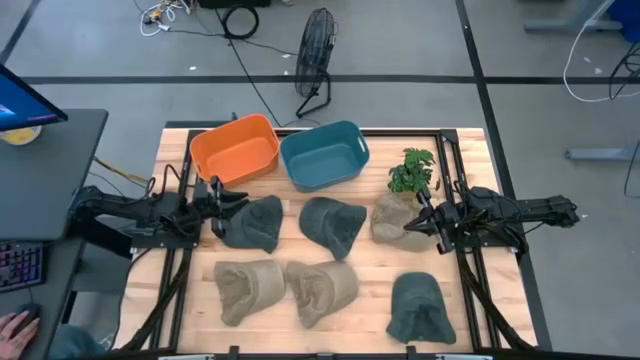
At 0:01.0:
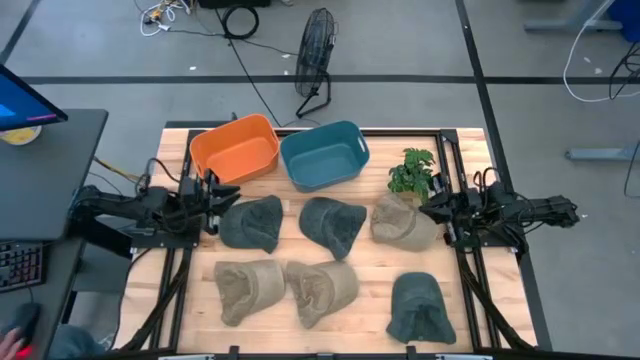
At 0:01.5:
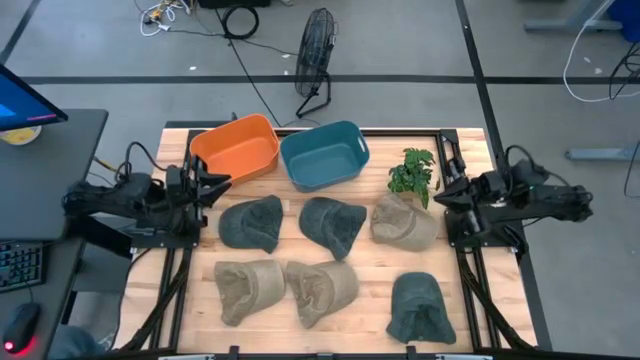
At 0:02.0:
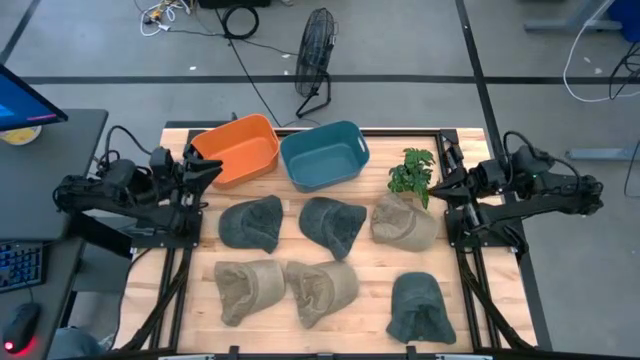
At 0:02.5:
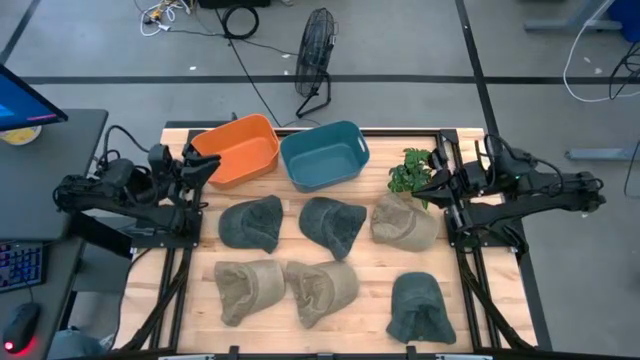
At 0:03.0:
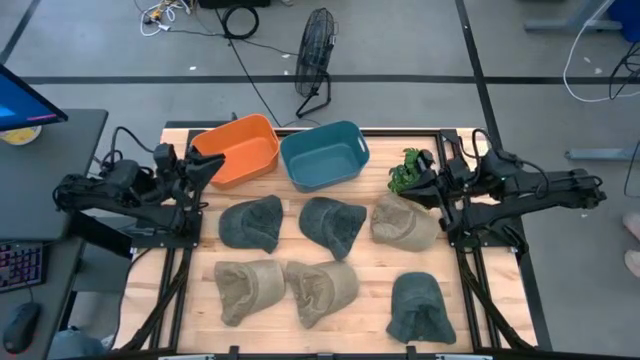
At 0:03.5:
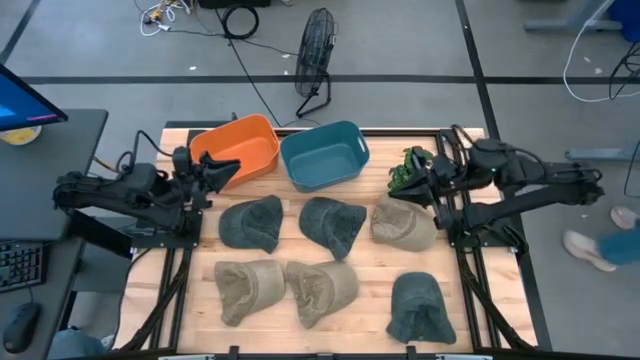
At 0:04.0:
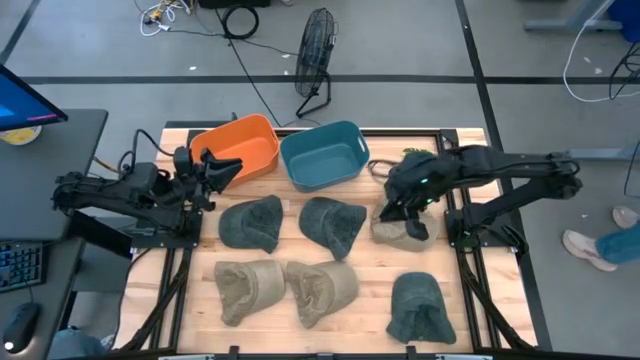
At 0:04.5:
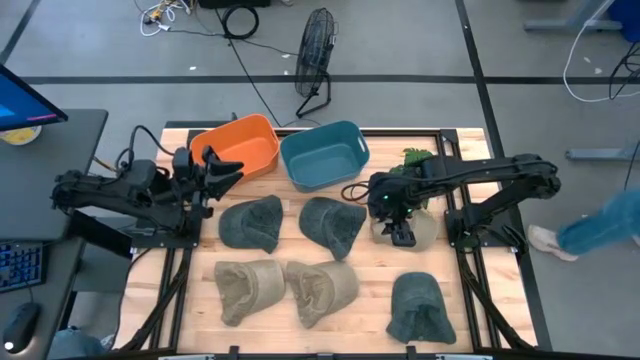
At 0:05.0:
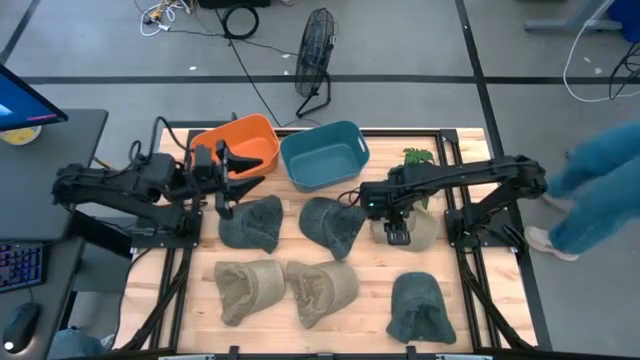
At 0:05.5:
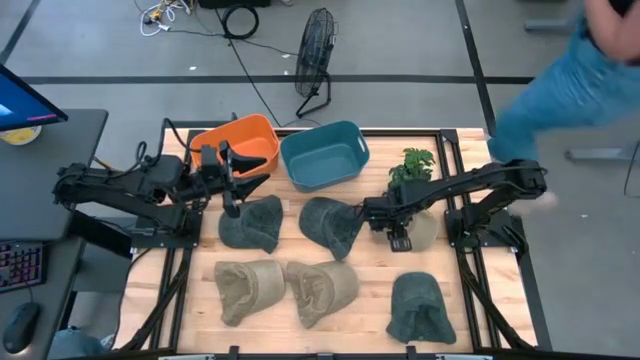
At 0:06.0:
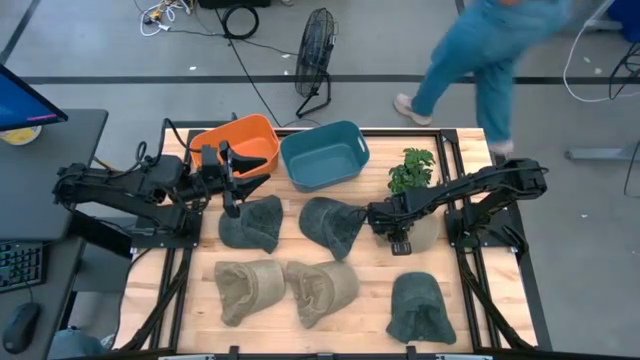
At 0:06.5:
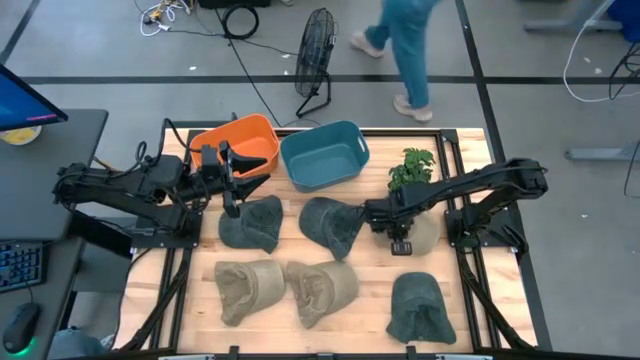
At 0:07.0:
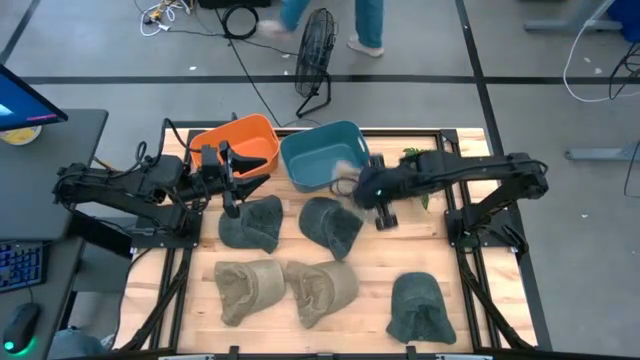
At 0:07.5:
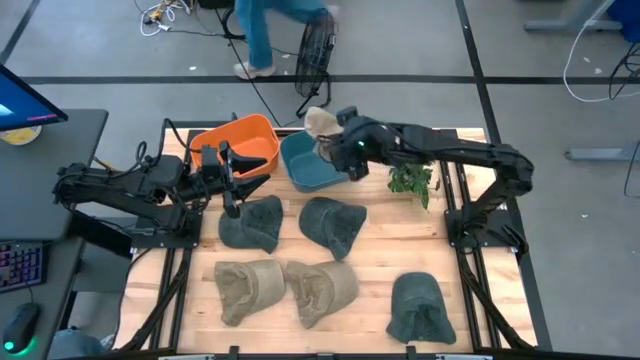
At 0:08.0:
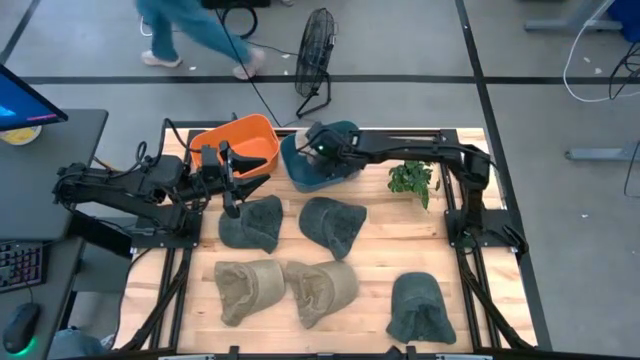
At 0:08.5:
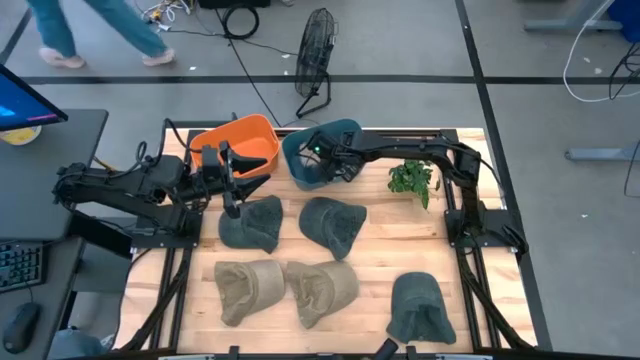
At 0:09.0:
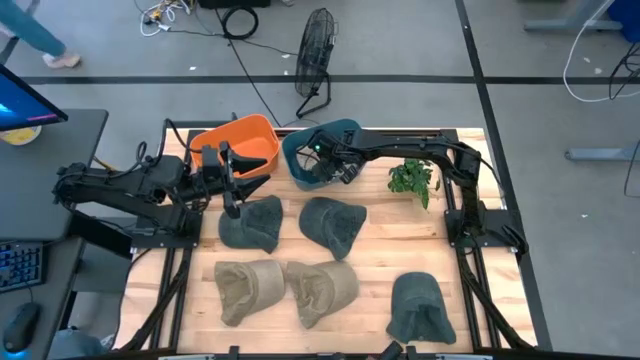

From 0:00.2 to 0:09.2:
Task: Pick & Place hat
Put the top brown cap into the blue bin

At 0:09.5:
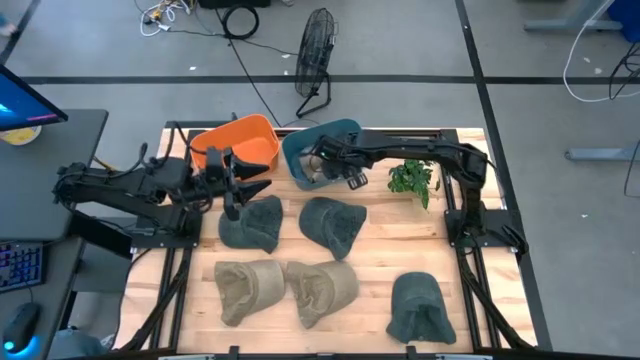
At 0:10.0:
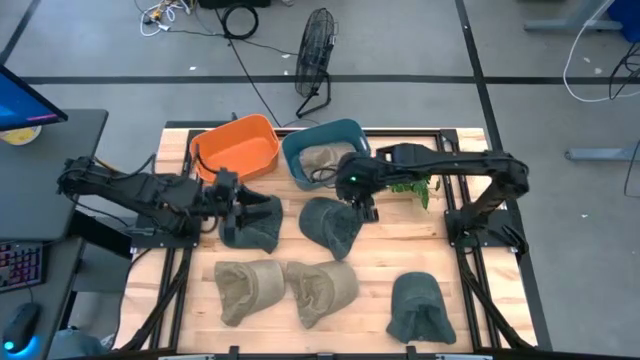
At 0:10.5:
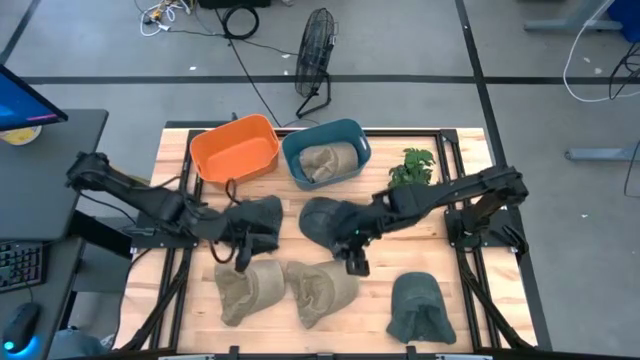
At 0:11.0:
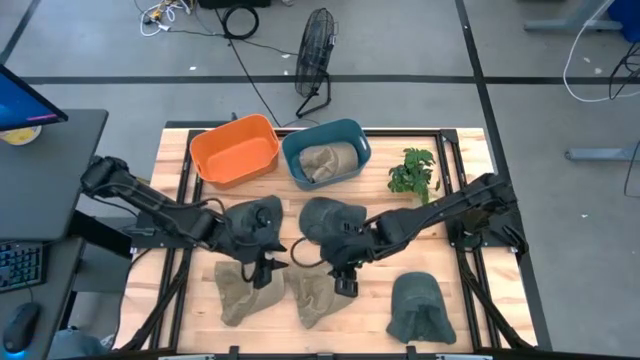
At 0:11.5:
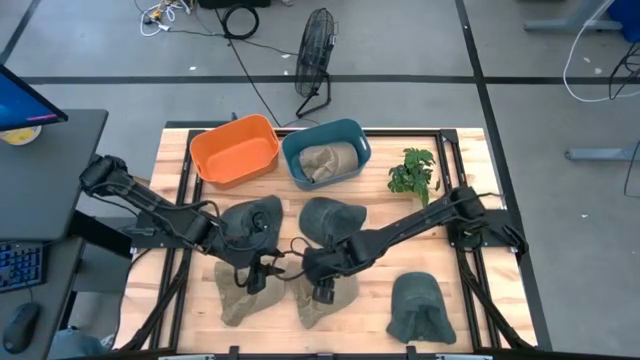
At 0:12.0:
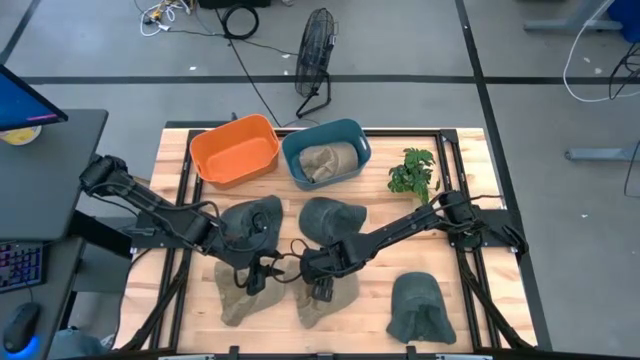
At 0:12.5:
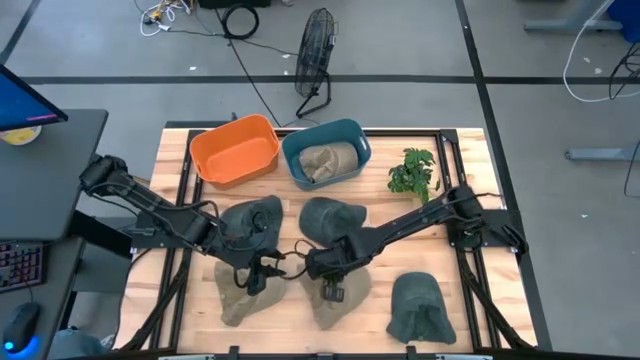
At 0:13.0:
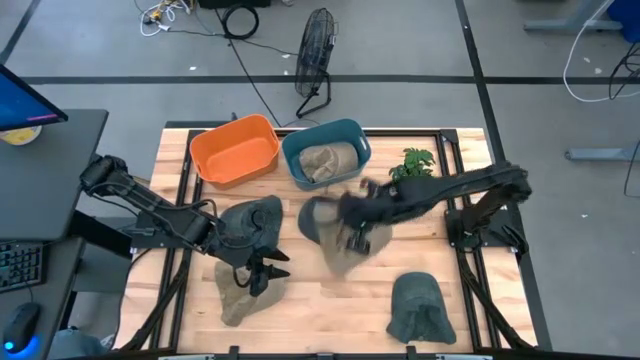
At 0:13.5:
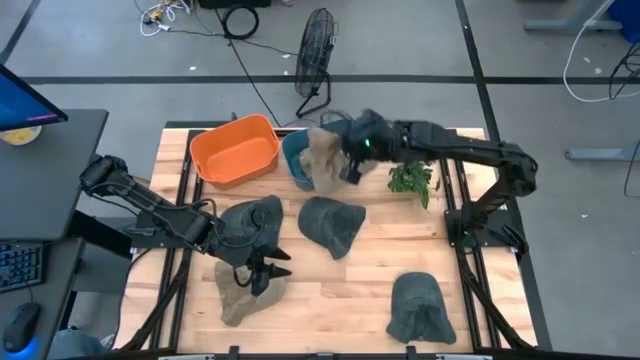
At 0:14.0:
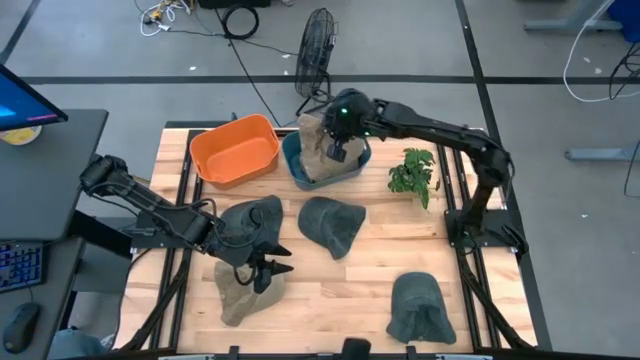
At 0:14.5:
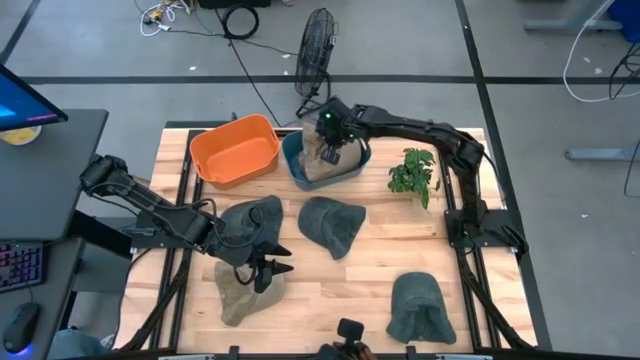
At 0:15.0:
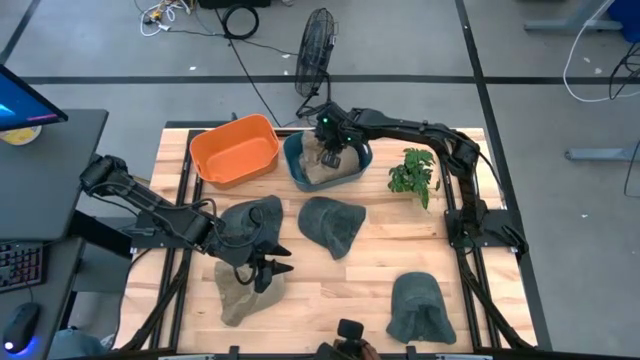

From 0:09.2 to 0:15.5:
Put the right brown cap into the blue bin

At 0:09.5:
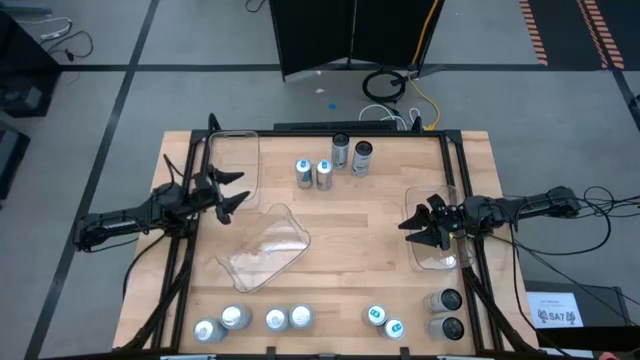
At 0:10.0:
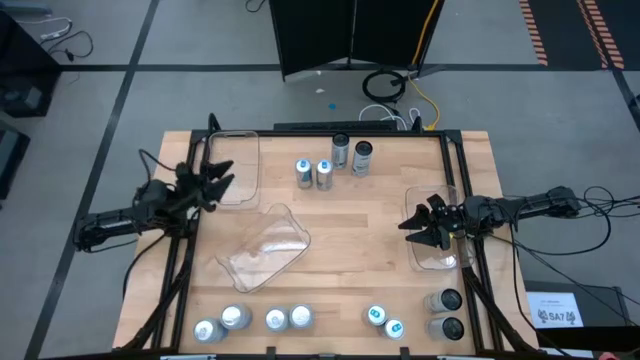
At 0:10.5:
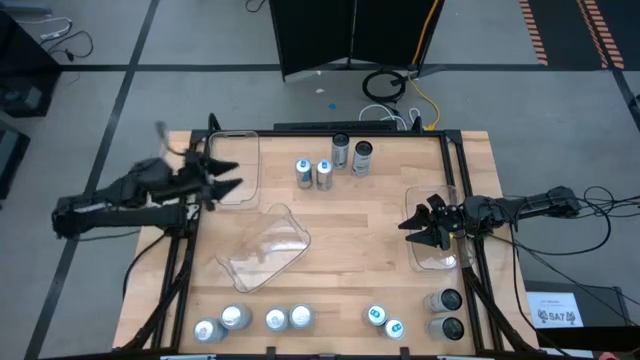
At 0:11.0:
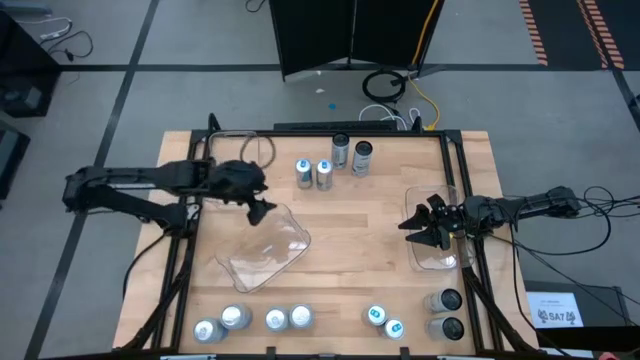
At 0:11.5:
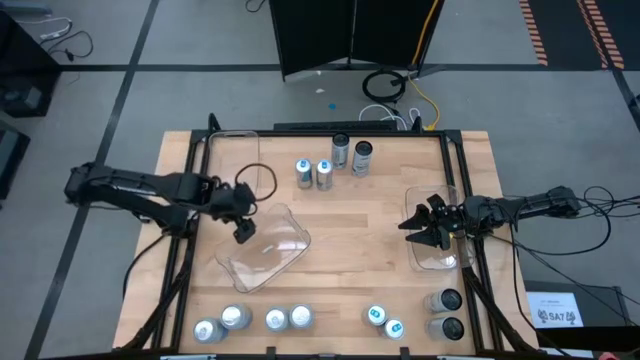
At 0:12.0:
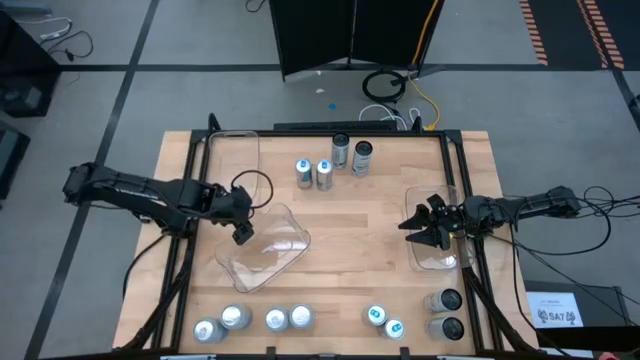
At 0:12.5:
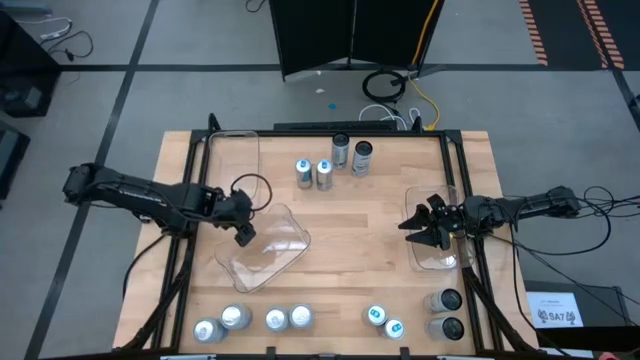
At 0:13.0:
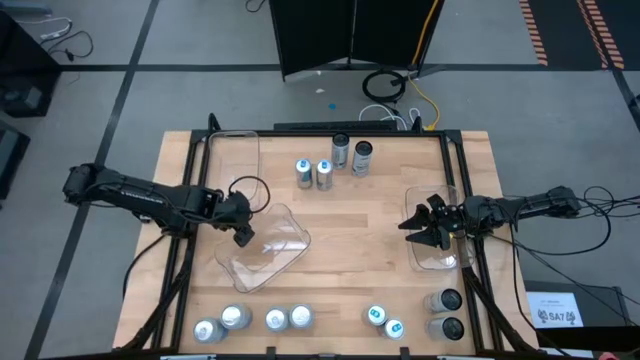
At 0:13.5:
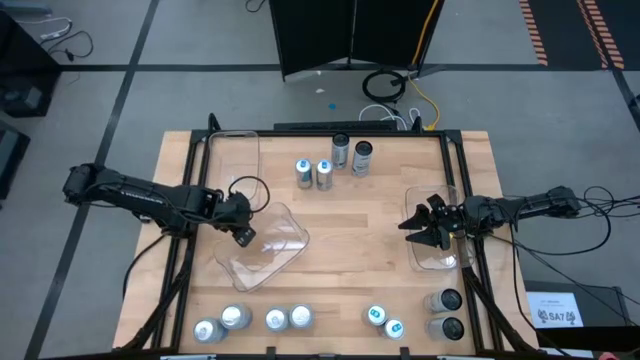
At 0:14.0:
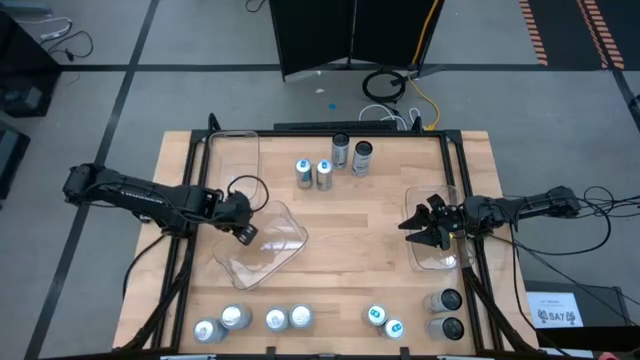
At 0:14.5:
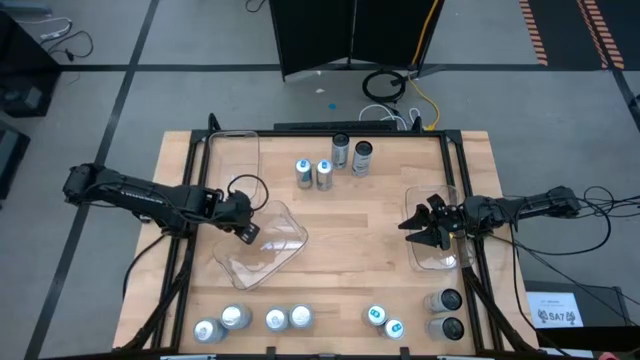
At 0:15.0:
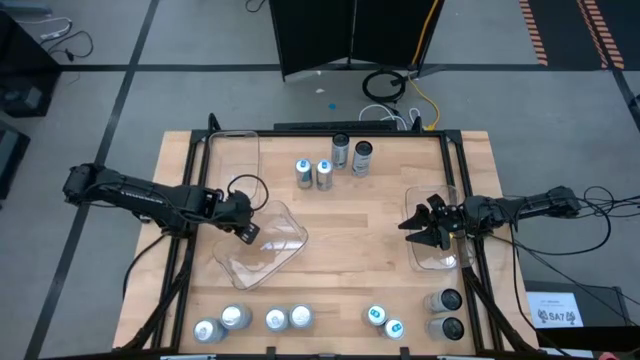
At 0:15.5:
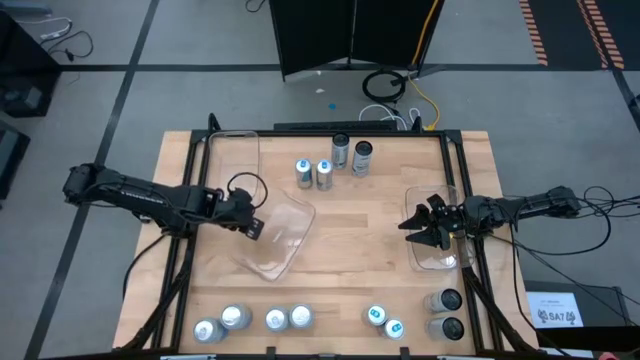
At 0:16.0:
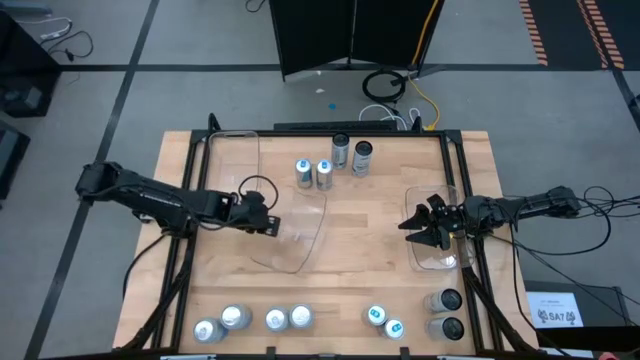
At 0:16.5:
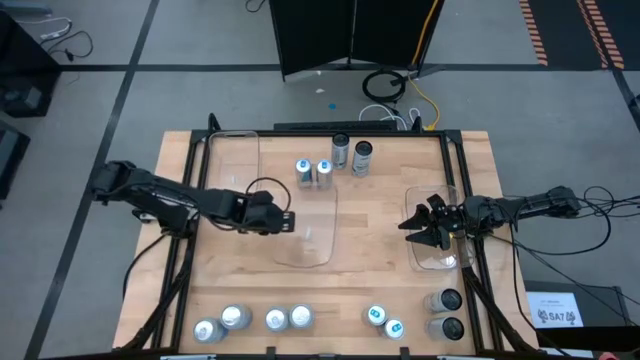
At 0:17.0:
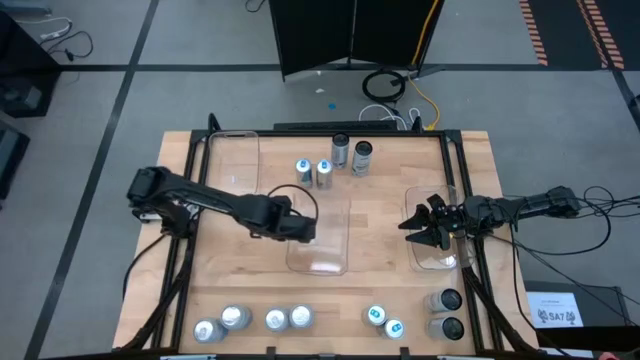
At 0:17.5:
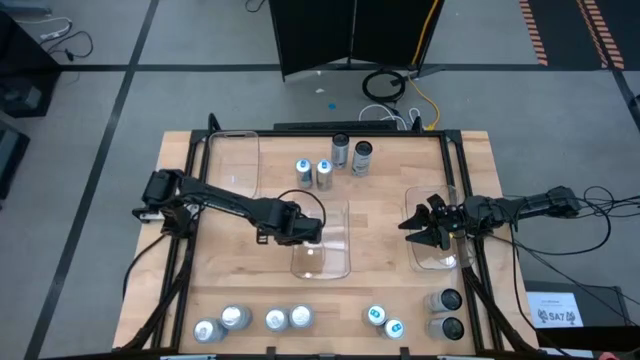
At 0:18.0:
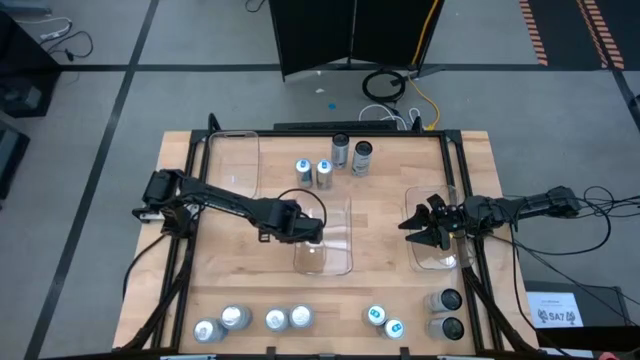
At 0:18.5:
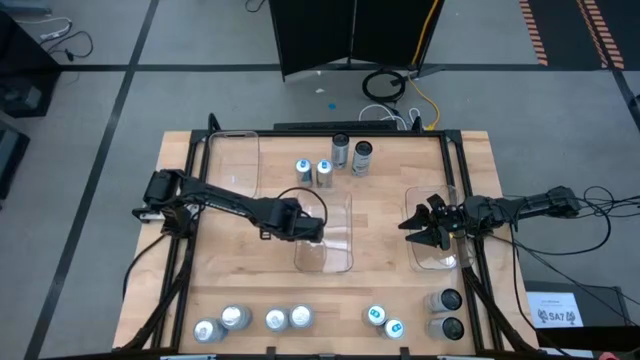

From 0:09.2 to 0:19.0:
Task: Sort soda cans
Move the bottom left transparent bin to the center of the table
